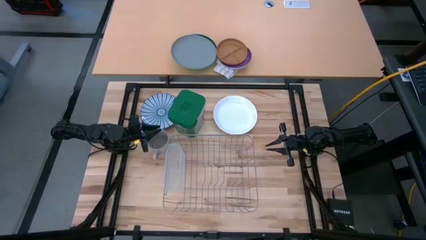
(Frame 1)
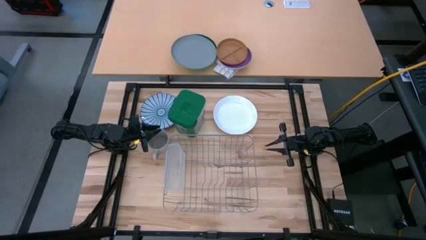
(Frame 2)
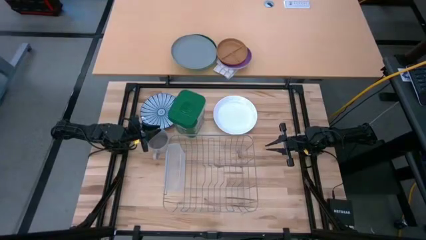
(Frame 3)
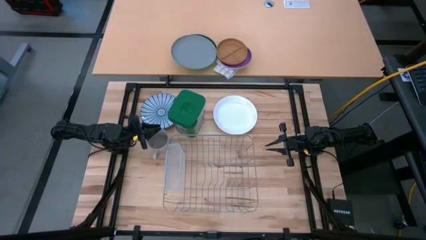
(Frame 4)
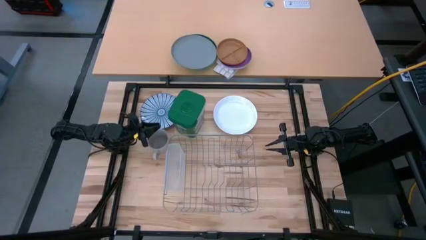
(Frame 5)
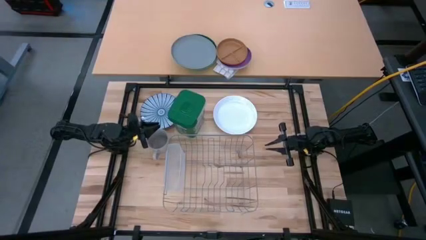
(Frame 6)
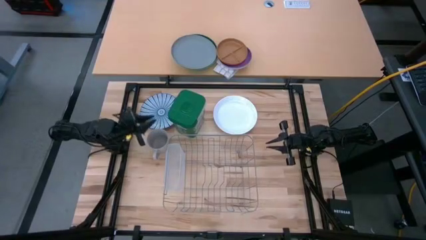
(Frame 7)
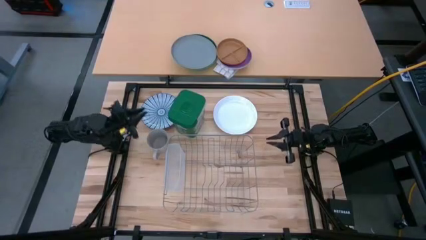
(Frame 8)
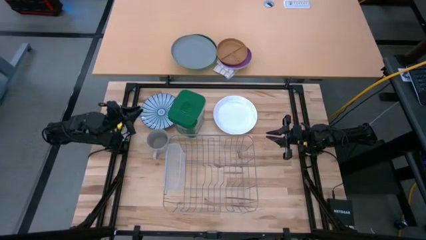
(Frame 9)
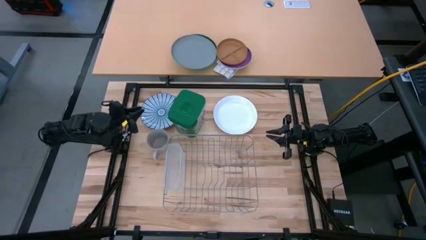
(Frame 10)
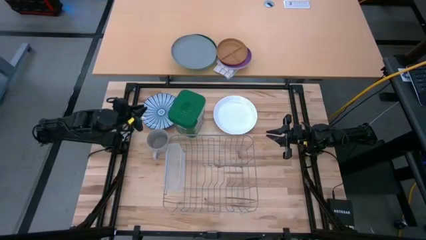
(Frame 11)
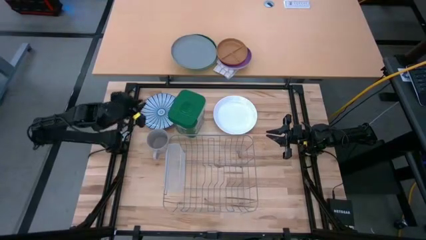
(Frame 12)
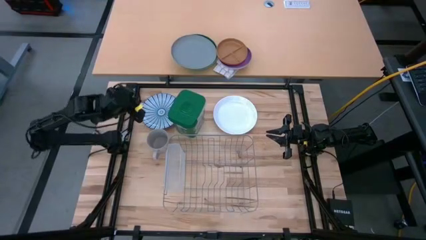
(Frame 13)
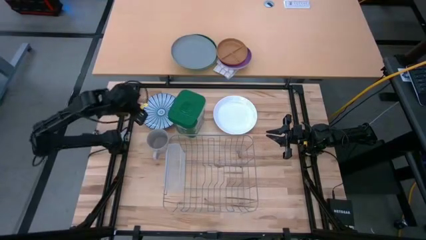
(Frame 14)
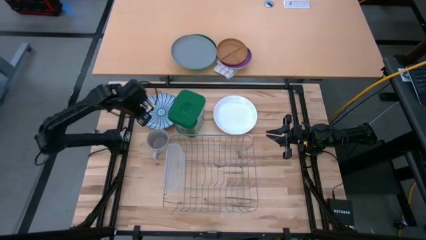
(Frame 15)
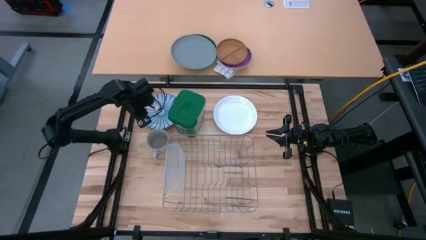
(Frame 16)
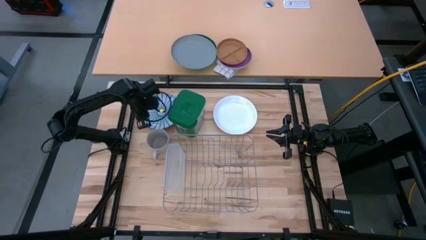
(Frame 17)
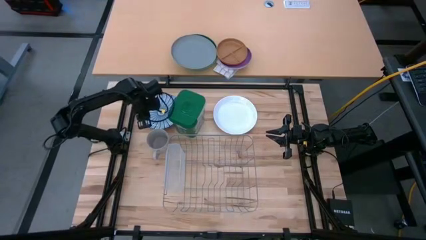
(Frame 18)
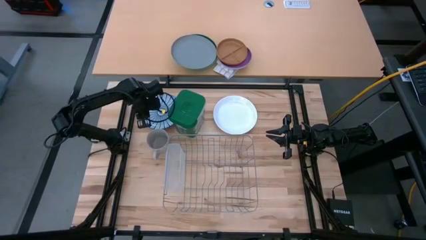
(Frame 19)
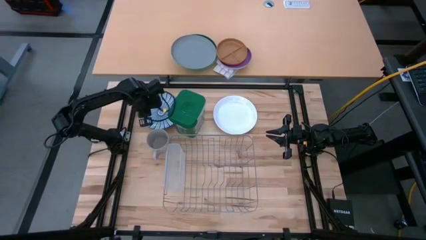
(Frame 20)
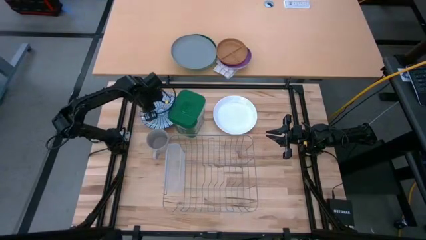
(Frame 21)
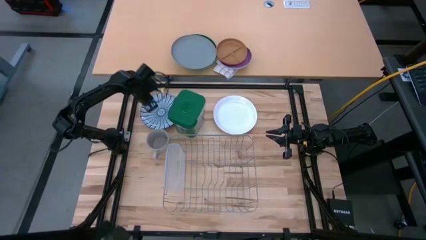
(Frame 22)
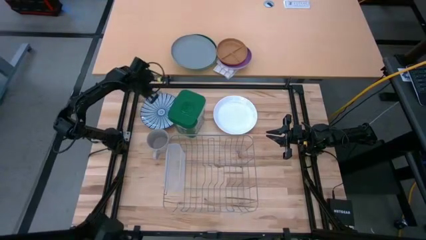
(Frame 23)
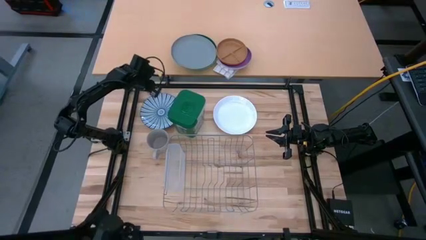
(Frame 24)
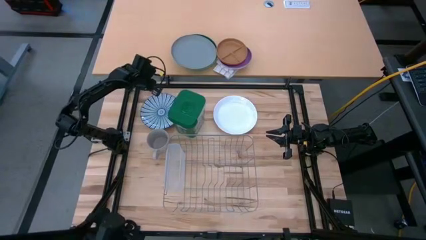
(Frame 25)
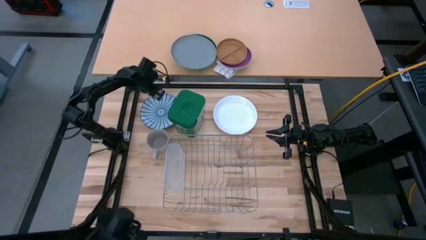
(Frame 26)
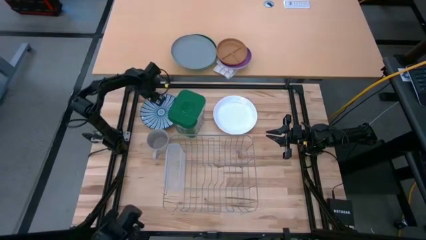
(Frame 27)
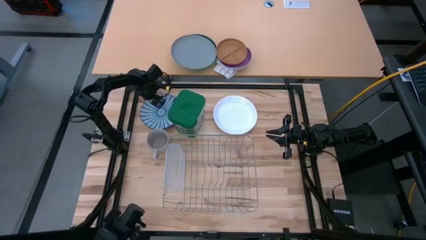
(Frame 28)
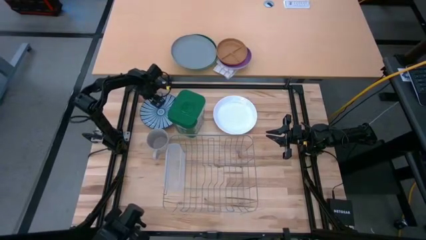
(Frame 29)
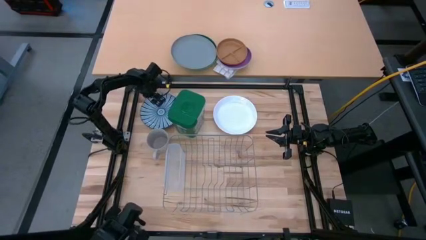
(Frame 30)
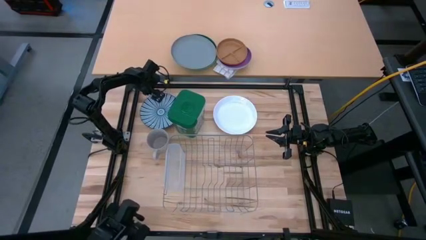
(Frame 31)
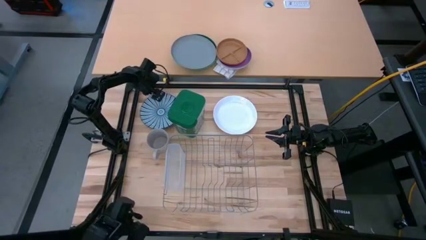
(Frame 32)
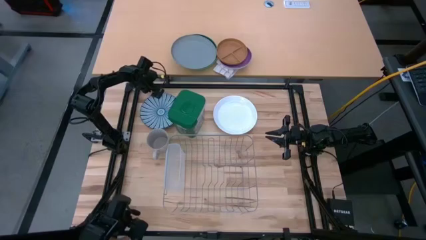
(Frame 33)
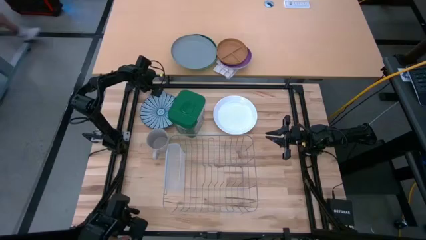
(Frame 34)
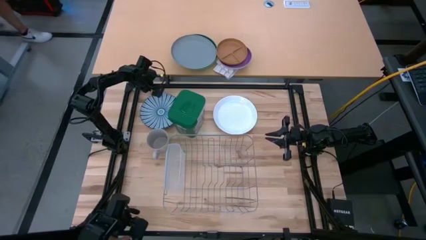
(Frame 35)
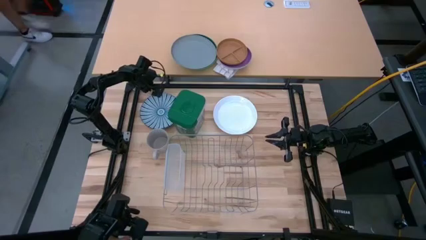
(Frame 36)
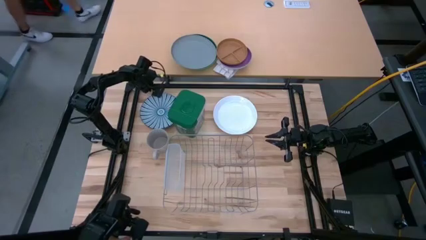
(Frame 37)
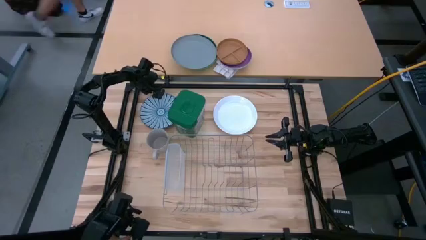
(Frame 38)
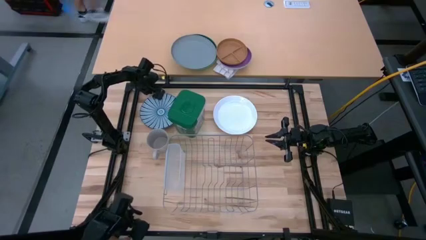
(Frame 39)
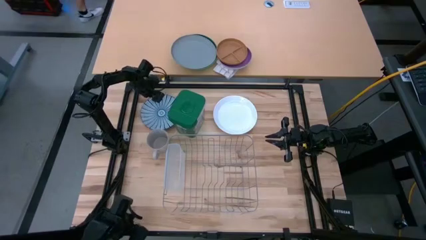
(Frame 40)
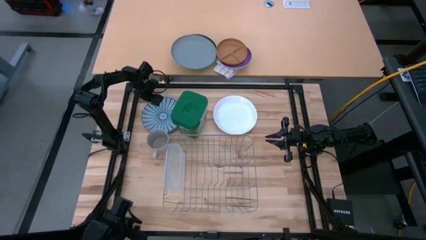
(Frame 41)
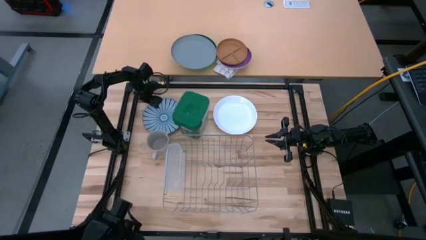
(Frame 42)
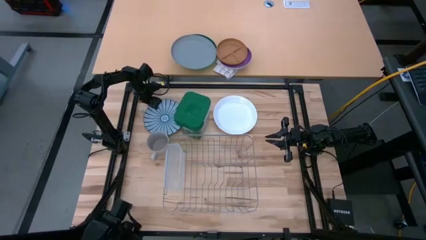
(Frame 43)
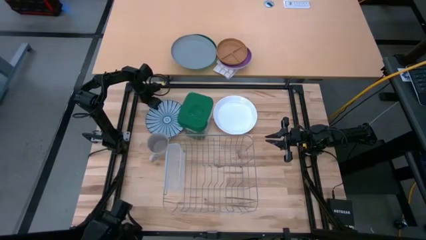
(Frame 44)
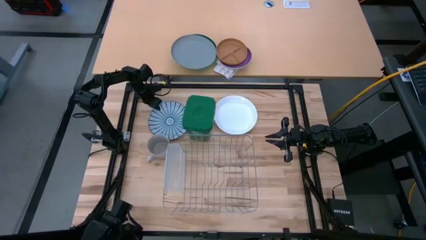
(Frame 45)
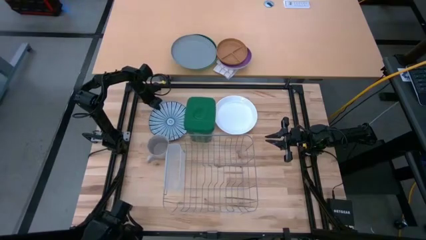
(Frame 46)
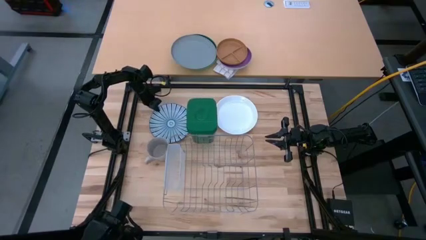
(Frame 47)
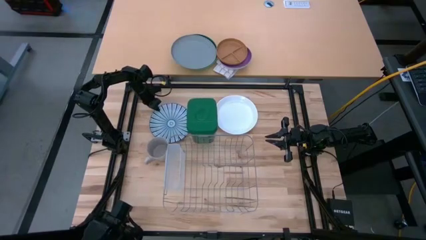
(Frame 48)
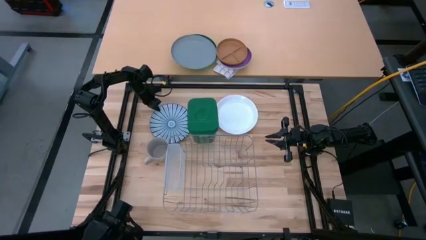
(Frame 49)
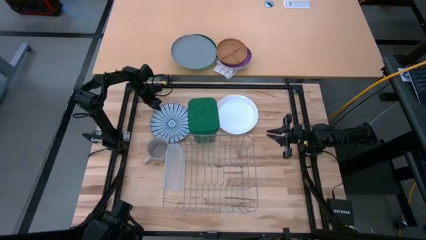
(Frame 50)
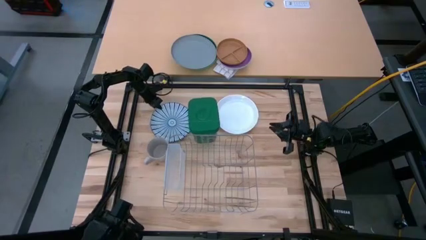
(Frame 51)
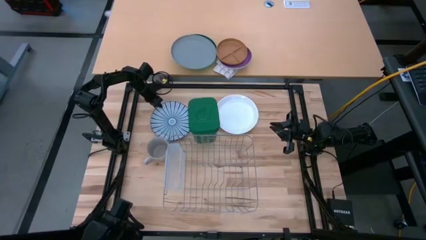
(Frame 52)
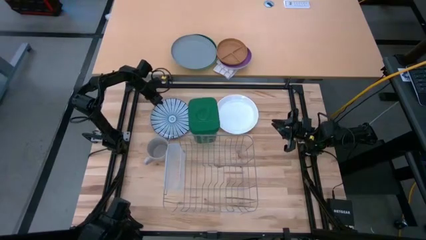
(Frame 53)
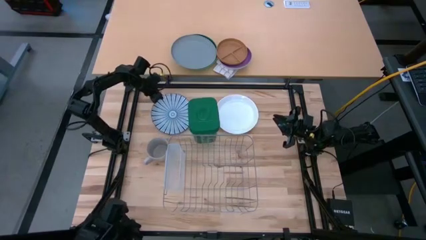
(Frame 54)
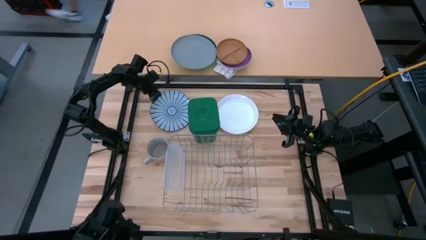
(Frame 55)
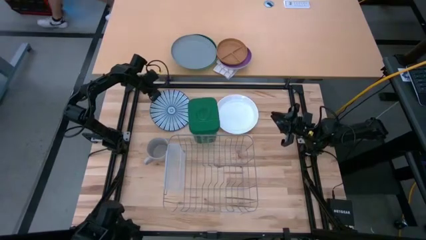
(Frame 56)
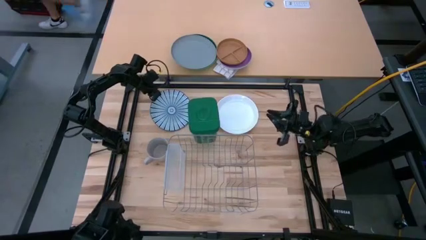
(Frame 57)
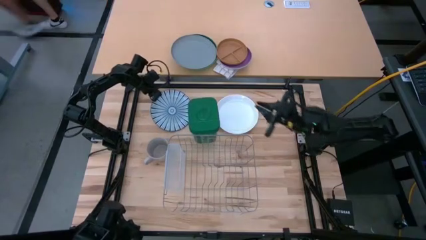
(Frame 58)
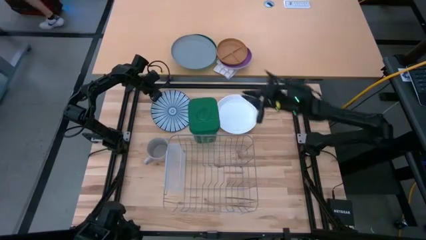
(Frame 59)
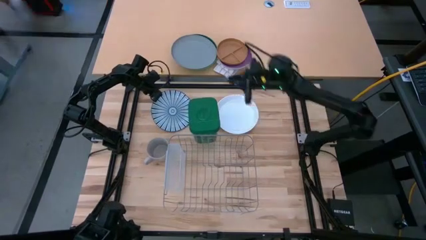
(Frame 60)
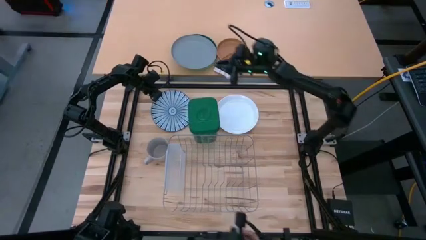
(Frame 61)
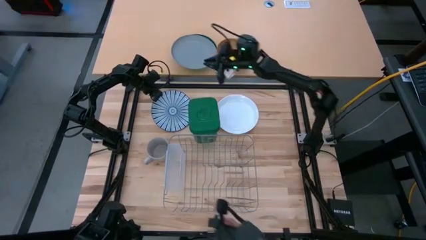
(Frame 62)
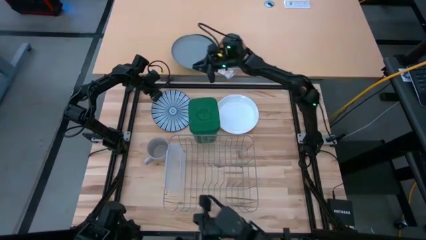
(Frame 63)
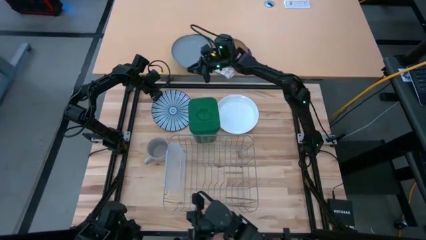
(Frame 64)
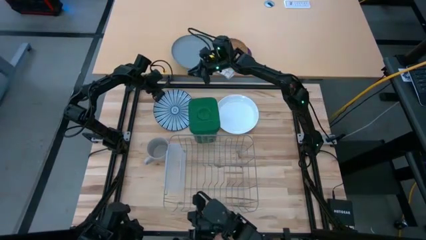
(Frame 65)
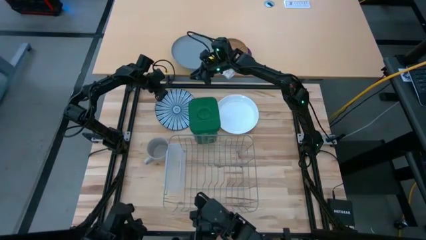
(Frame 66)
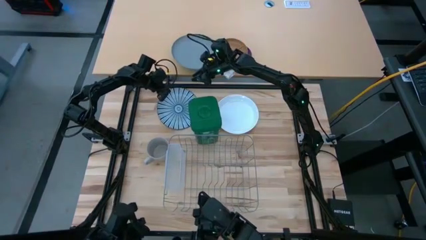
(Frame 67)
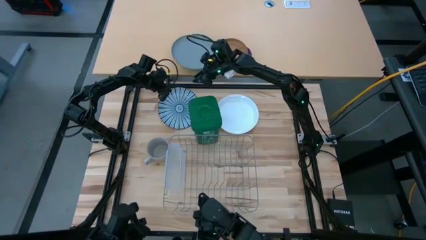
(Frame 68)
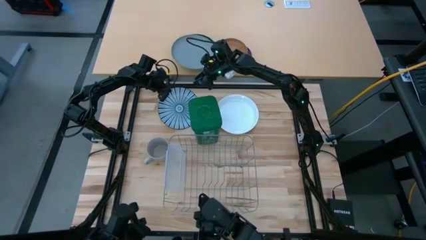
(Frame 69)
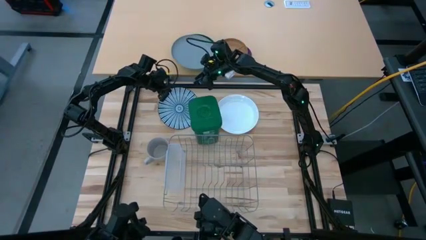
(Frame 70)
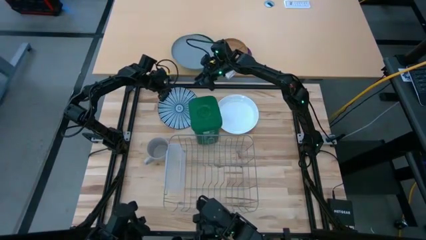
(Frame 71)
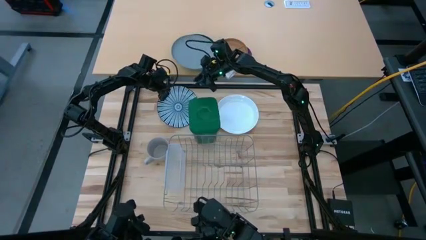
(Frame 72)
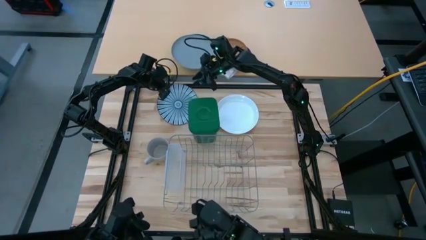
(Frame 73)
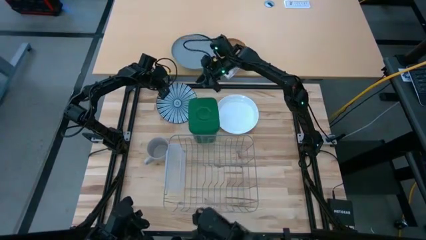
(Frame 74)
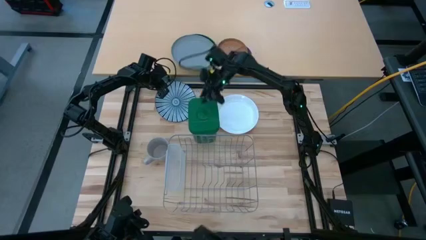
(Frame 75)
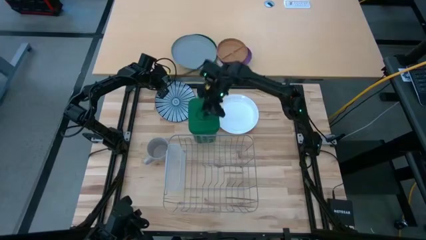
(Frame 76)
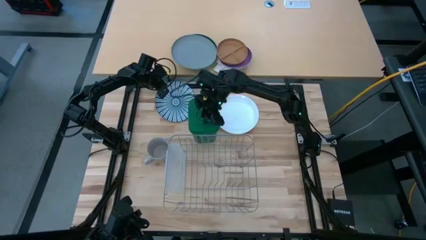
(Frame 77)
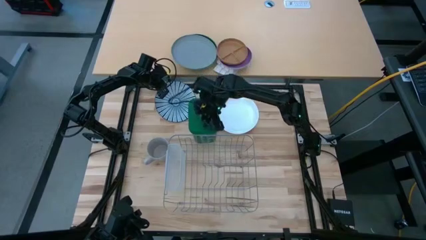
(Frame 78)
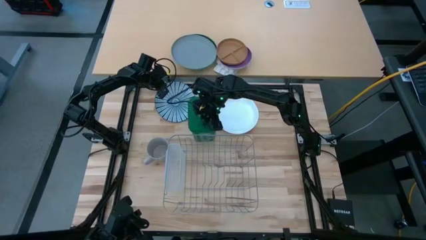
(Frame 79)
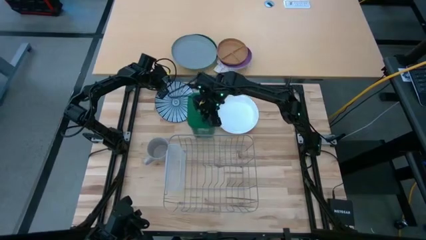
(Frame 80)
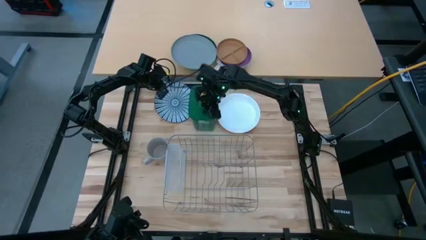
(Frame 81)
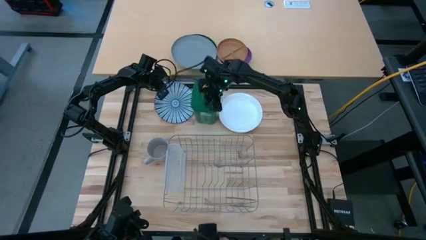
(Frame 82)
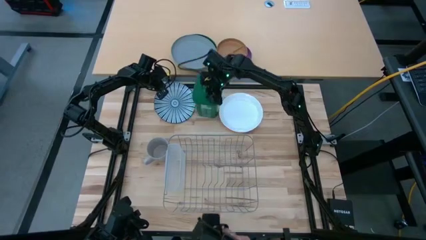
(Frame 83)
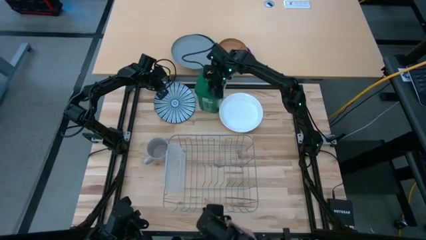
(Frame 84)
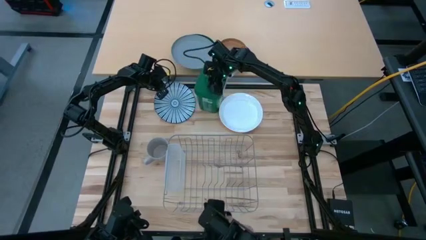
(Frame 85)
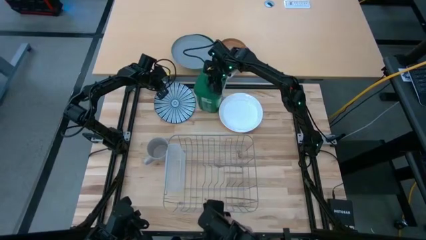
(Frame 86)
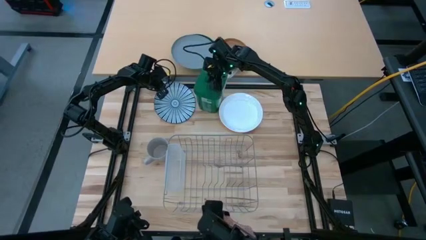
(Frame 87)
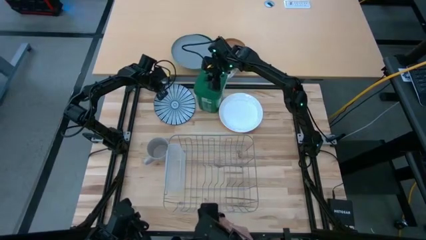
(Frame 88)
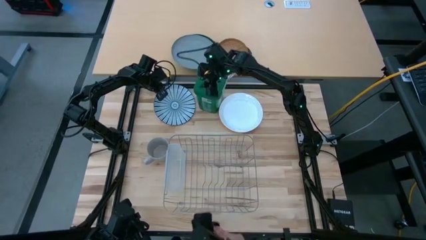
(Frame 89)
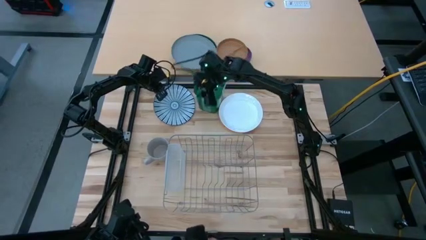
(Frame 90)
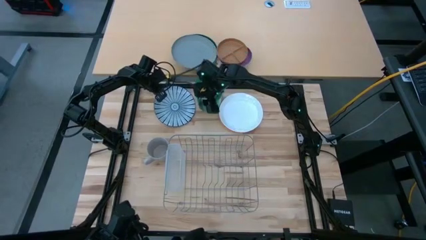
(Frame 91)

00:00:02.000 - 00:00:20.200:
Task: Sort dishes
Put the blue plate in the dish rack
